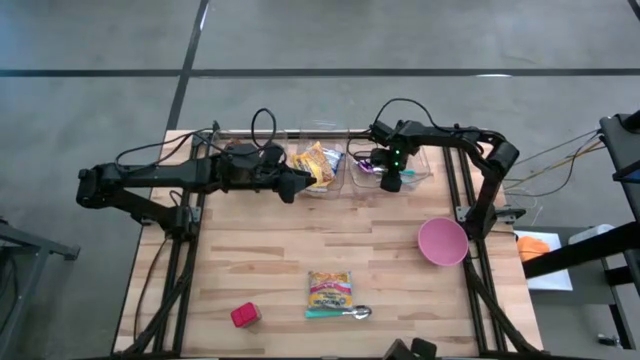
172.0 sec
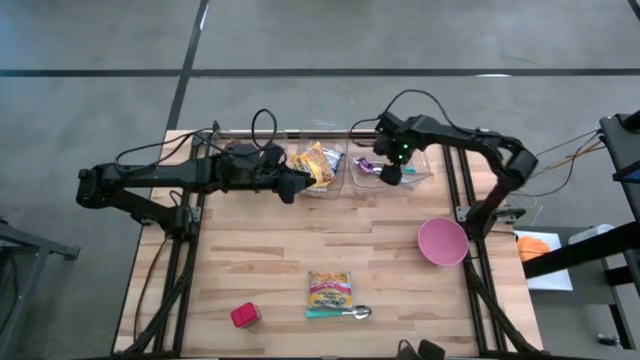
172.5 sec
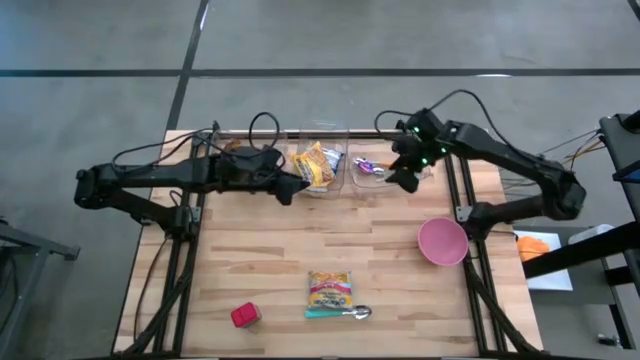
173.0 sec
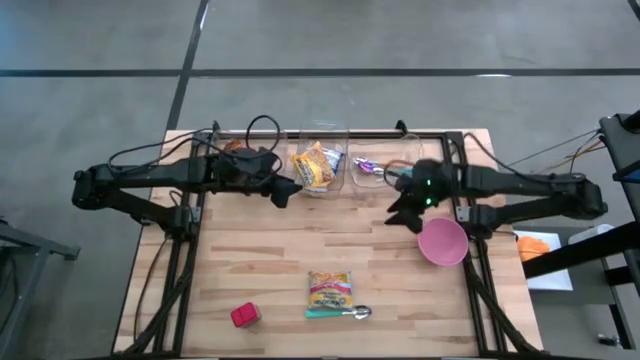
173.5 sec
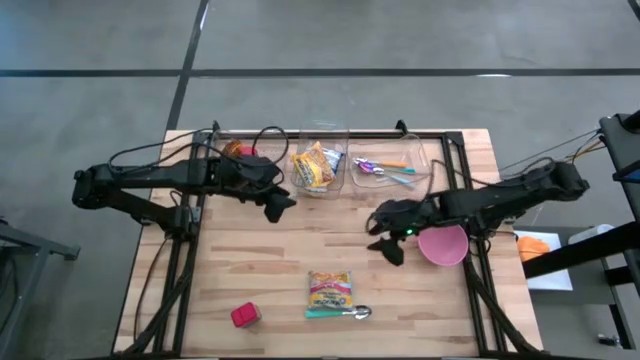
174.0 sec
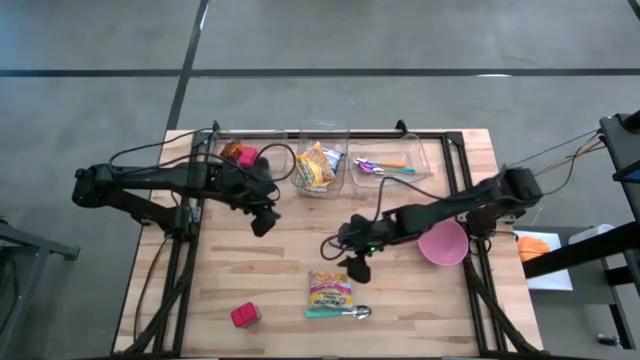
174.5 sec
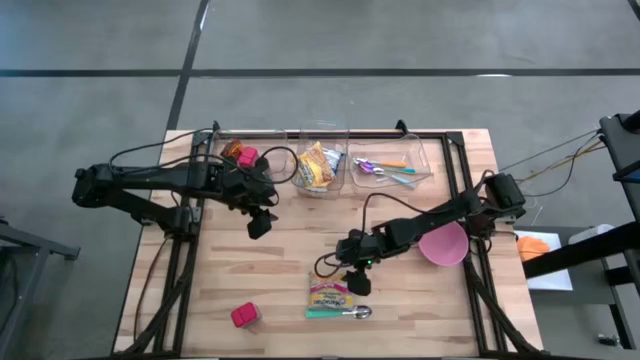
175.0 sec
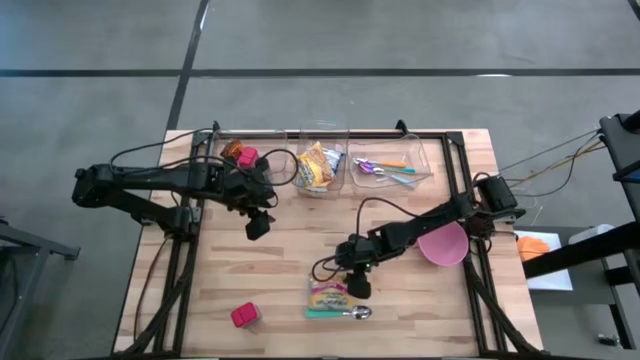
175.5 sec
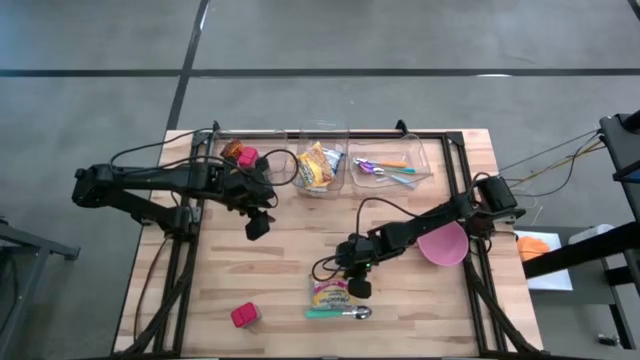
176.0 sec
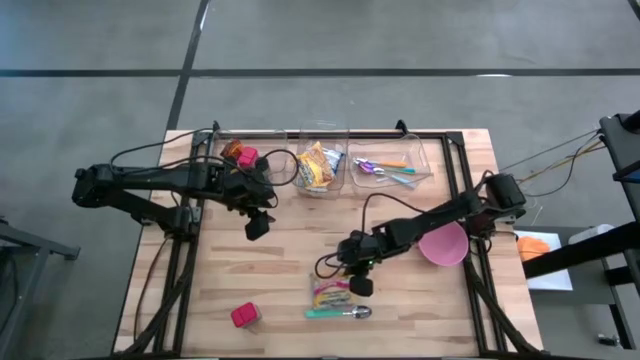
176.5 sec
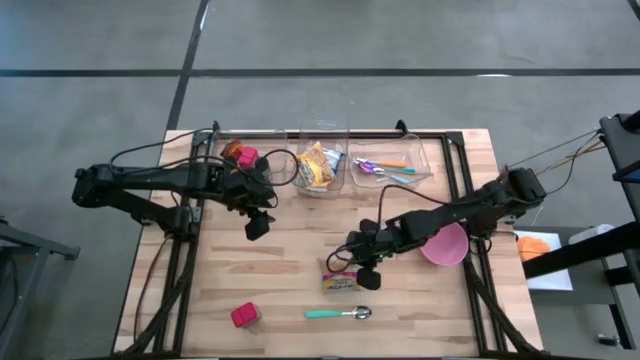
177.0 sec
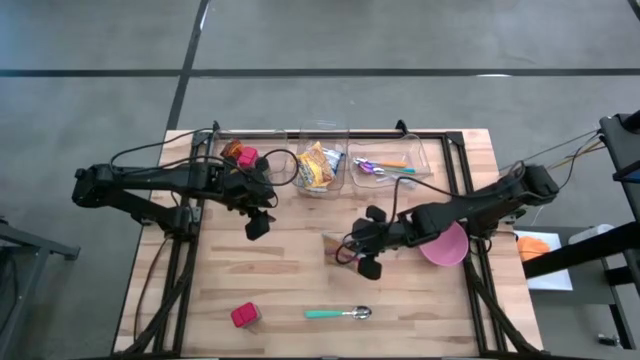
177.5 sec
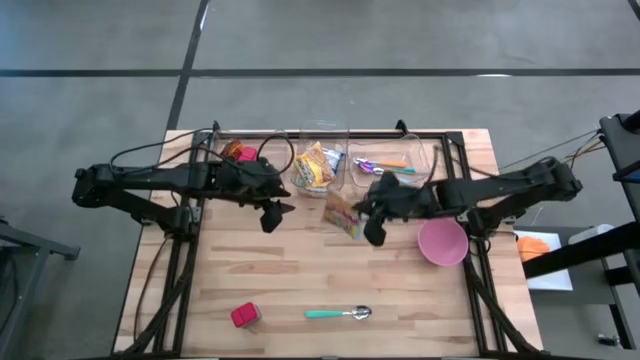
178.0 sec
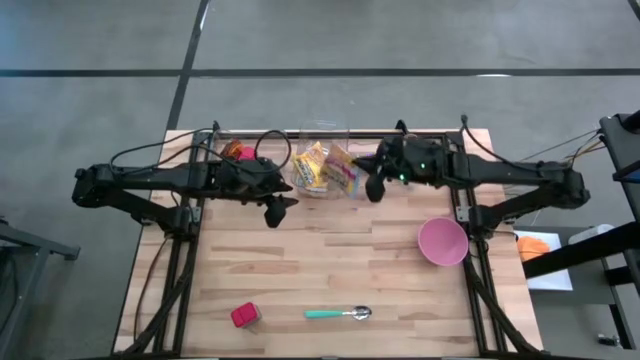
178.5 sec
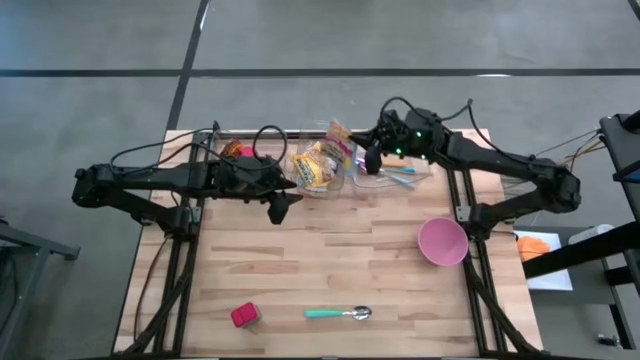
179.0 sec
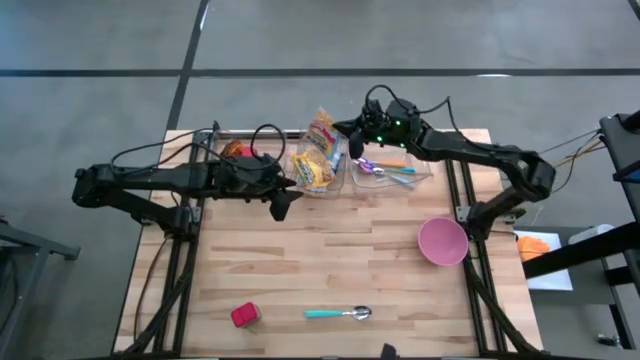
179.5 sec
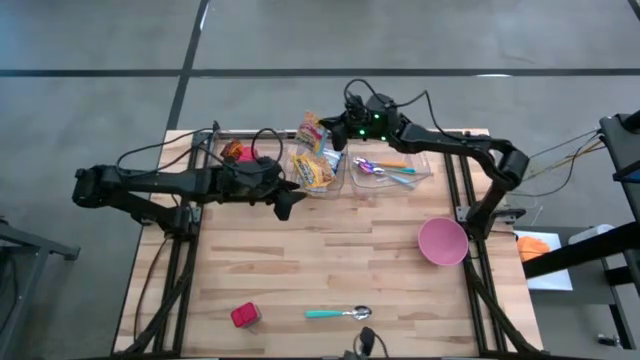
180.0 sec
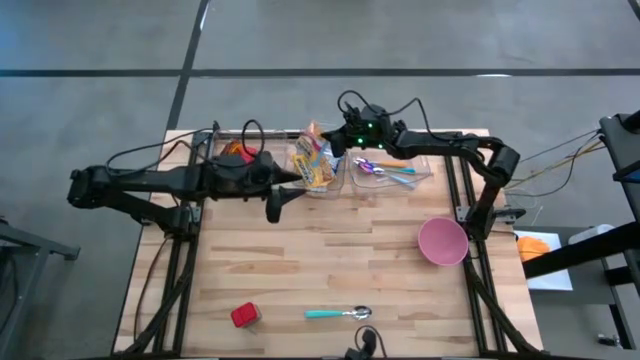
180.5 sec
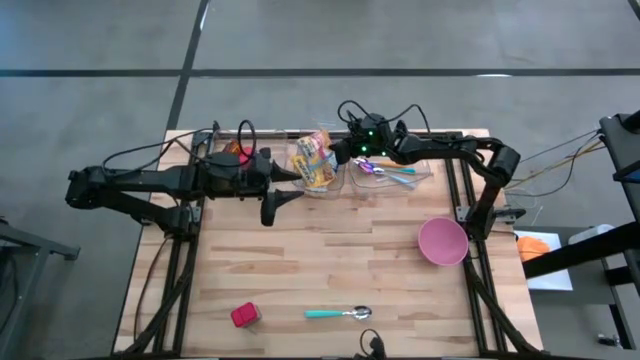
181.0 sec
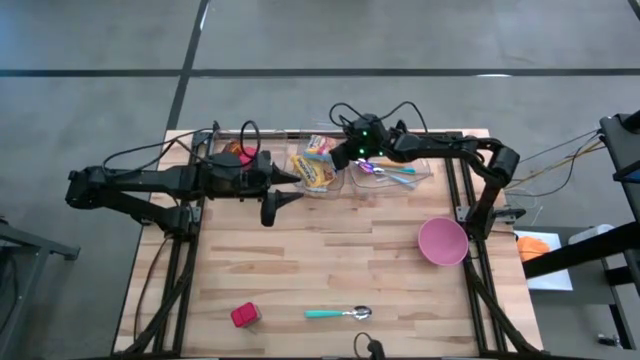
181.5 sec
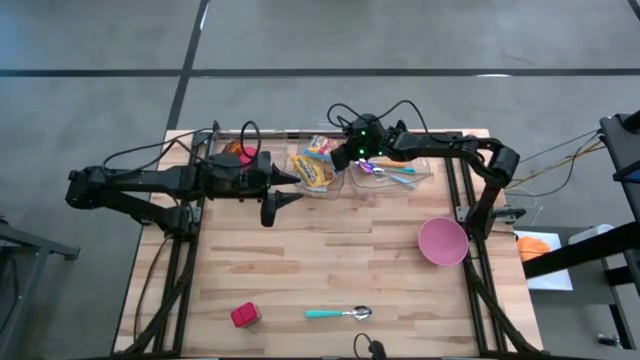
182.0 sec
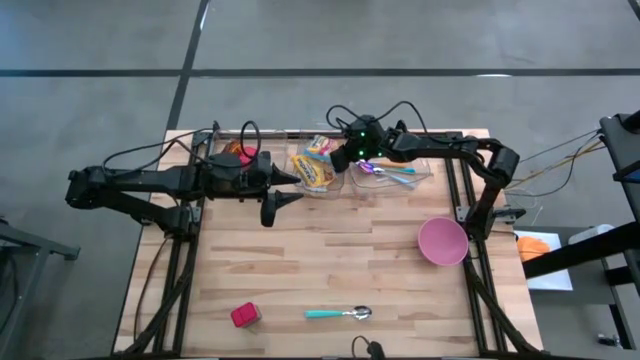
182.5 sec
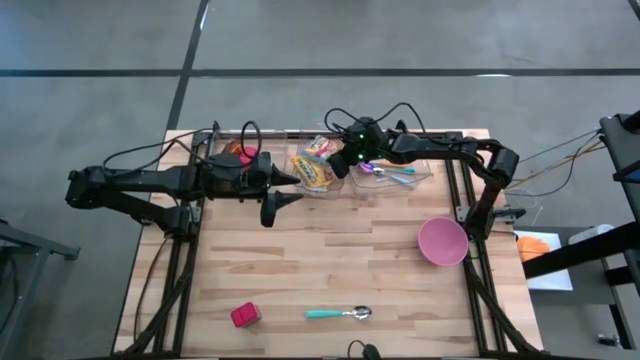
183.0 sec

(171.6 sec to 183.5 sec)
Put the light blue noodle pack into the middle transparent bin

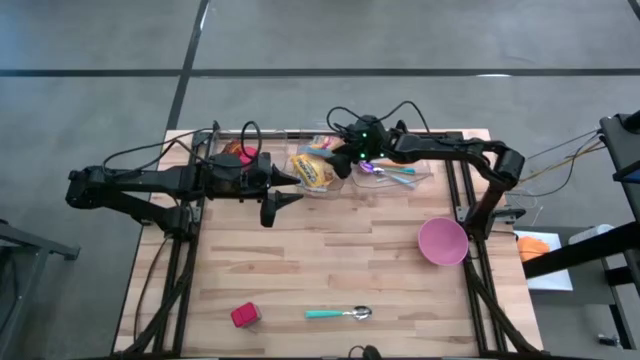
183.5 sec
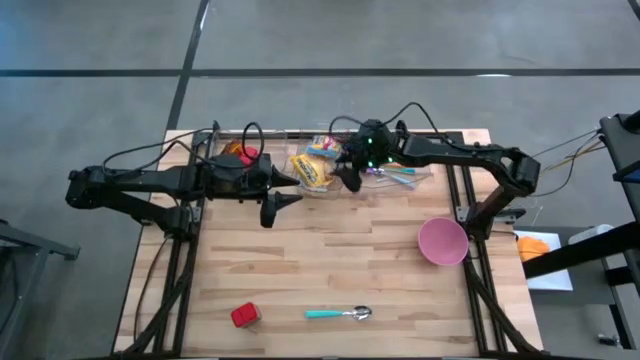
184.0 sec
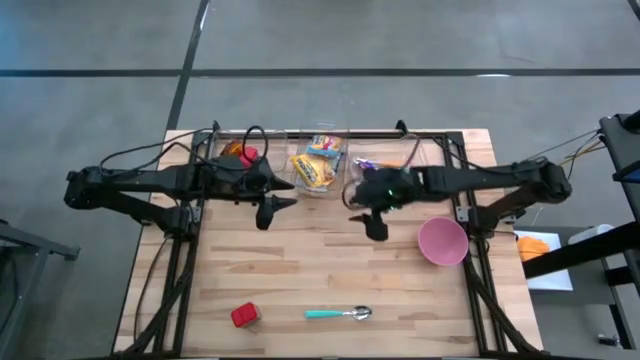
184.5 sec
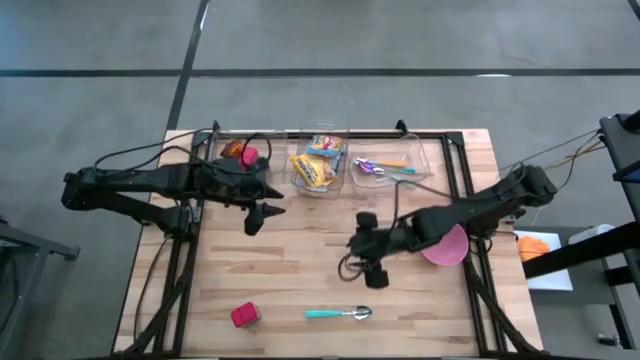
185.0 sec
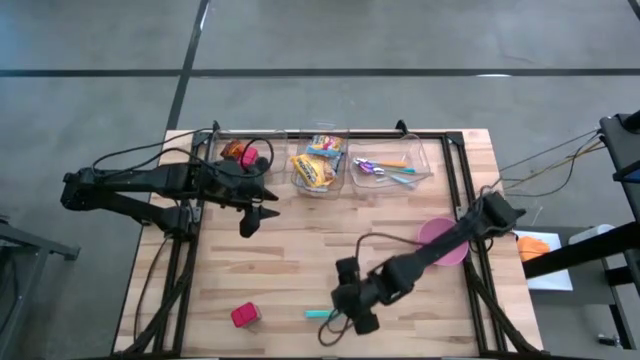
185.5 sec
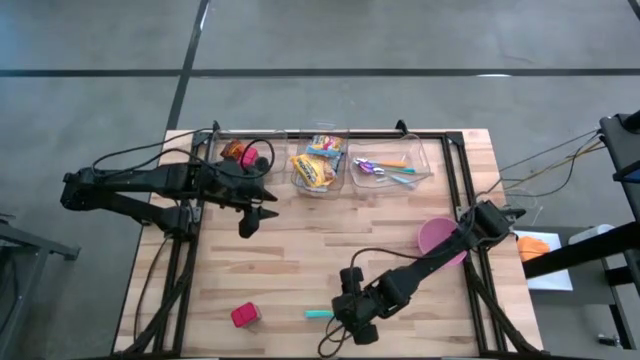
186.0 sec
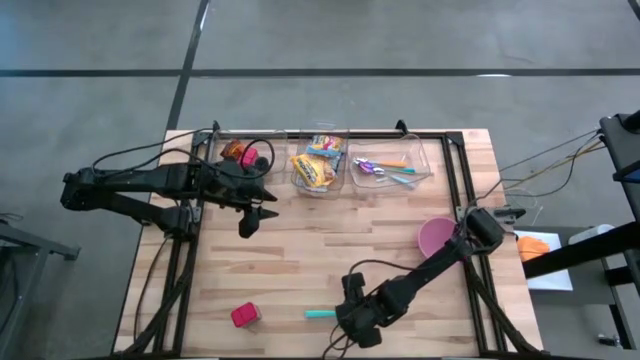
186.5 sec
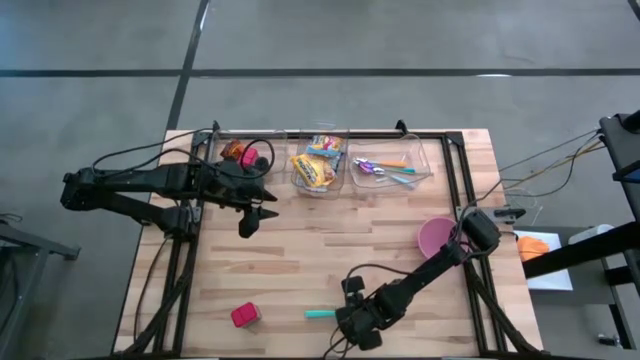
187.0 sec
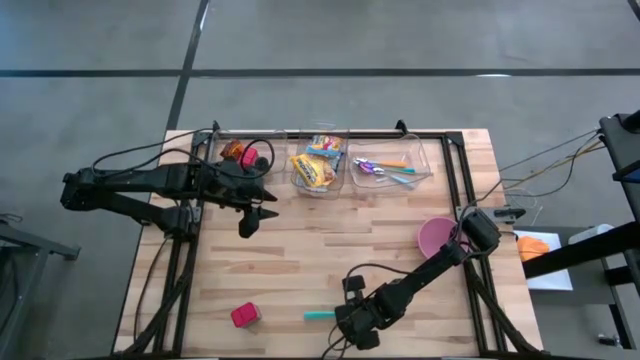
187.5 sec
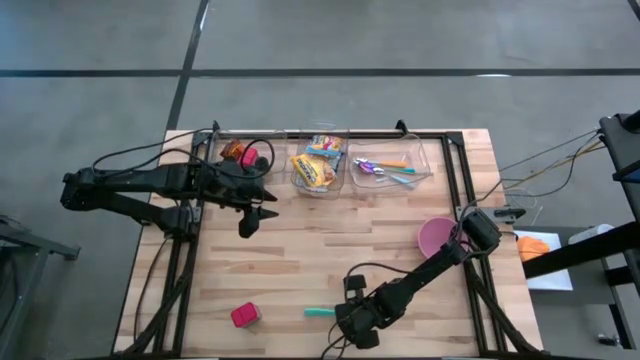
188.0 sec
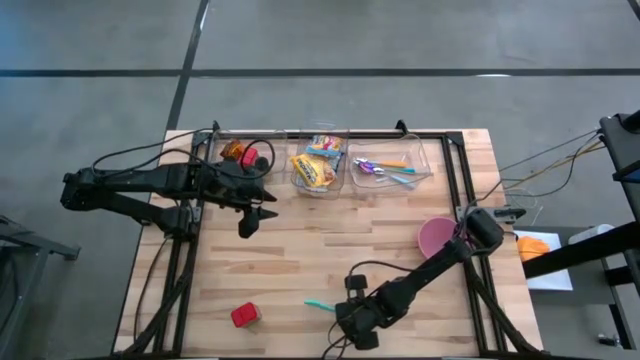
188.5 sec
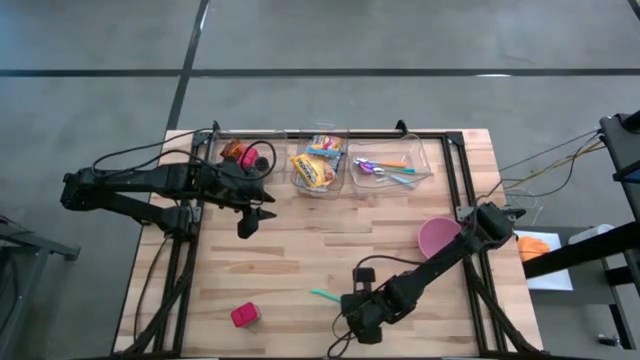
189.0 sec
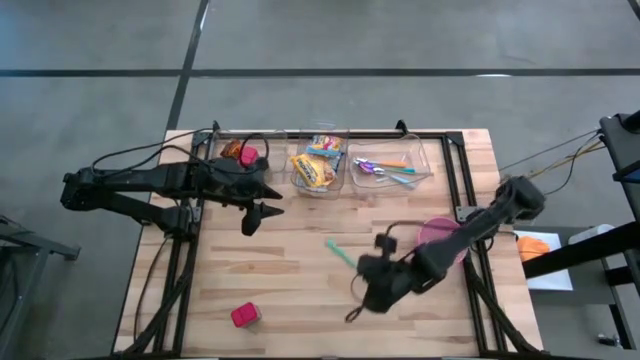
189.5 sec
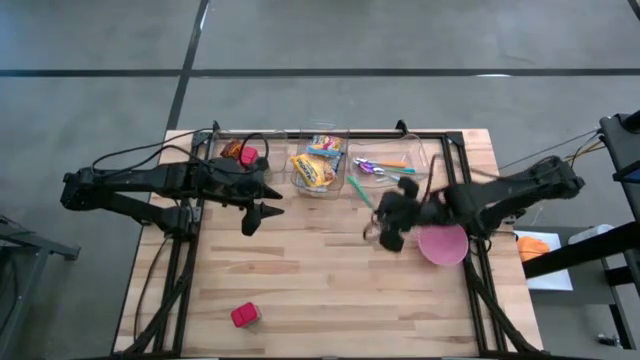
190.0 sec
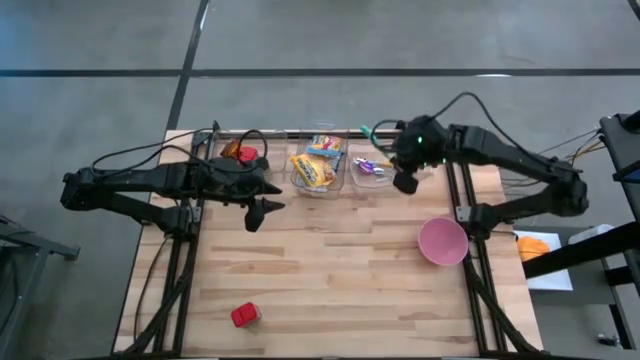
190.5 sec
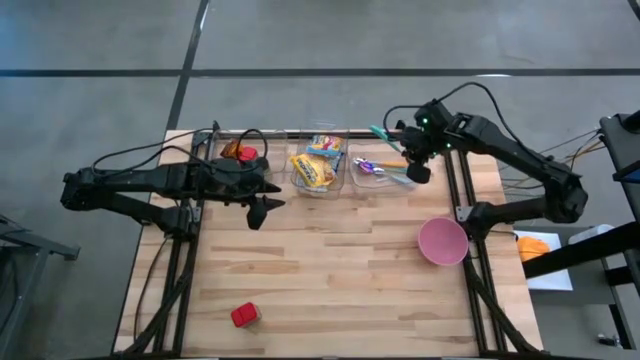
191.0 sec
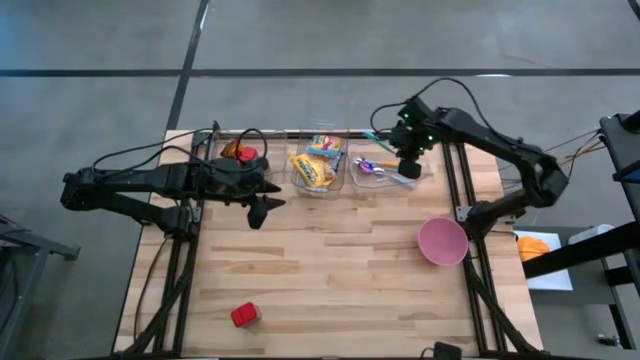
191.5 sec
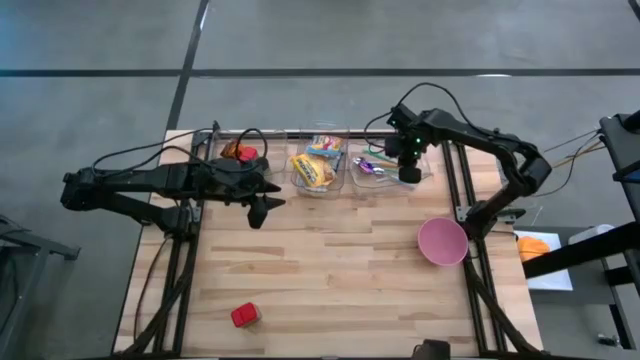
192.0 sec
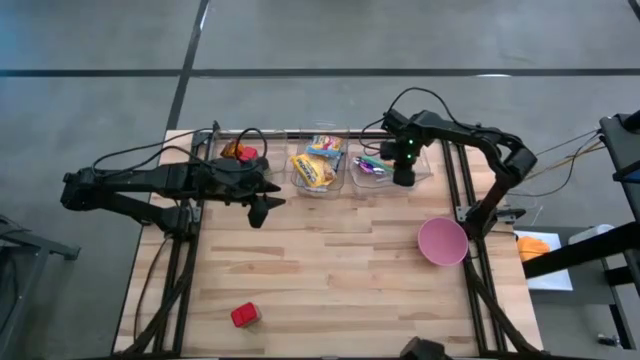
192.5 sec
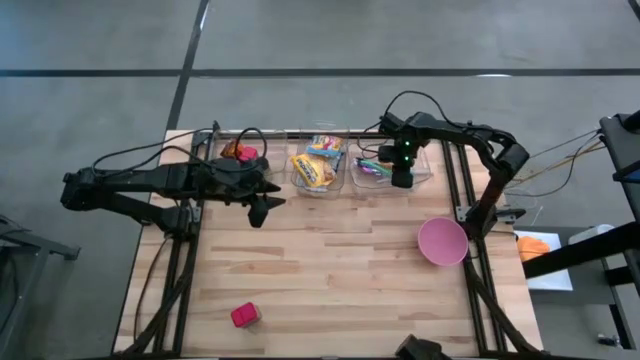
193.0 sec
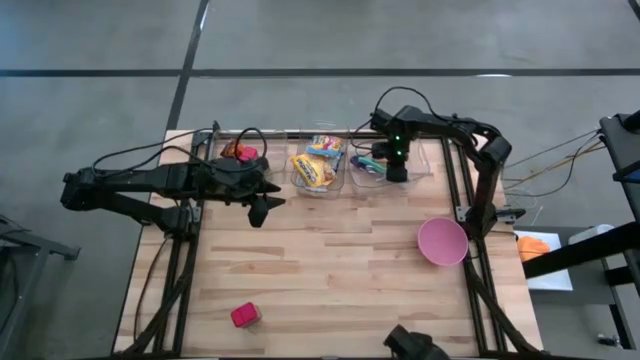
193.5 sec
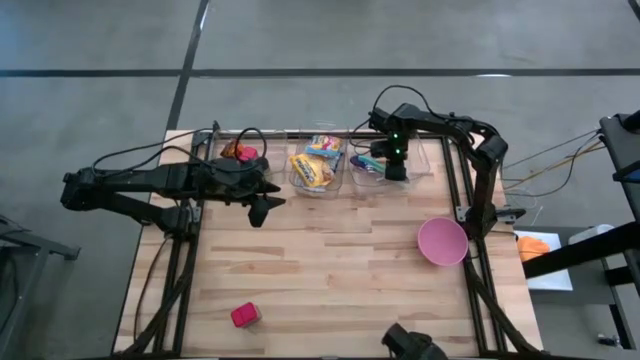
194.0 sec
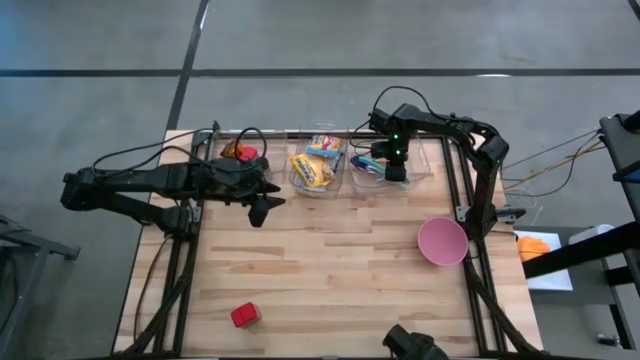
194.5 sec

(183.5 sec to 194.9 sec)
Put the light green spoon into the right transparent bin
